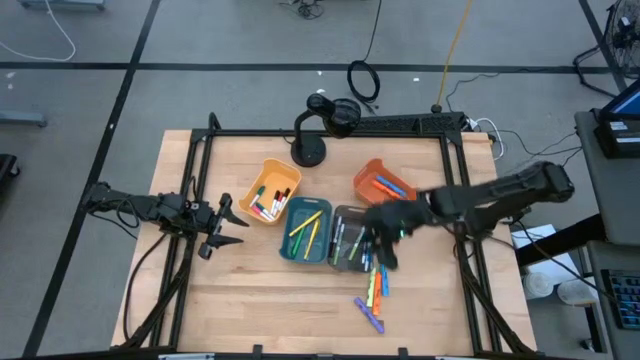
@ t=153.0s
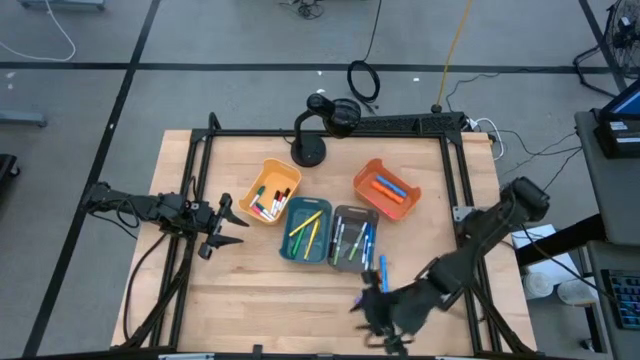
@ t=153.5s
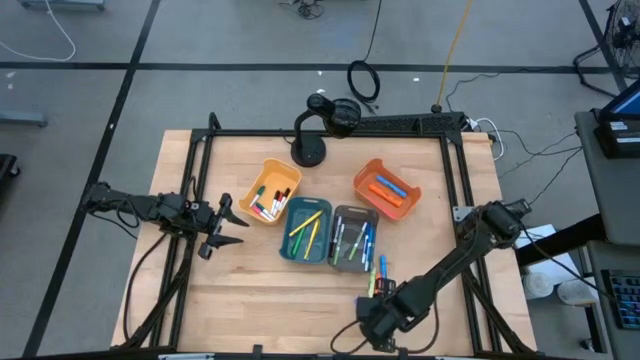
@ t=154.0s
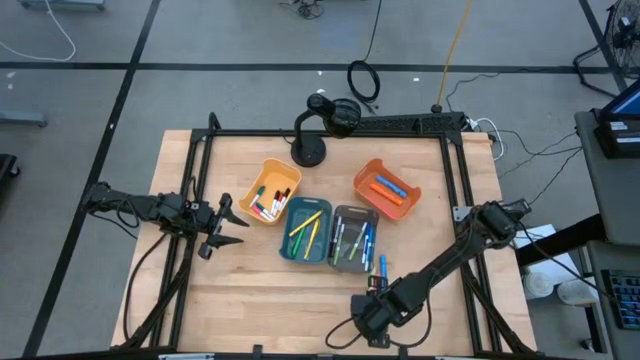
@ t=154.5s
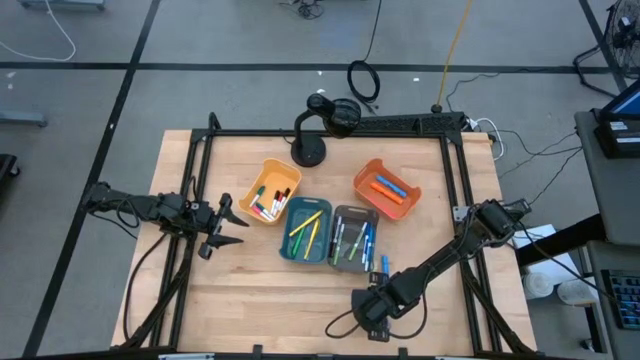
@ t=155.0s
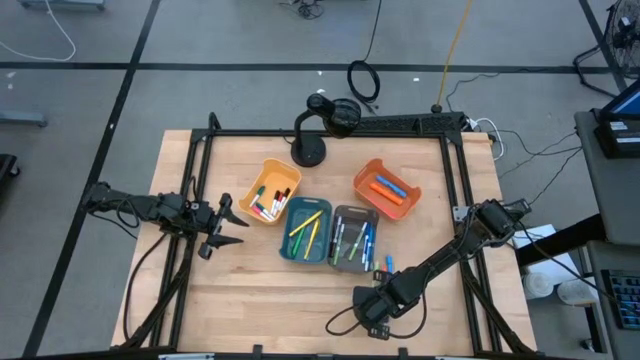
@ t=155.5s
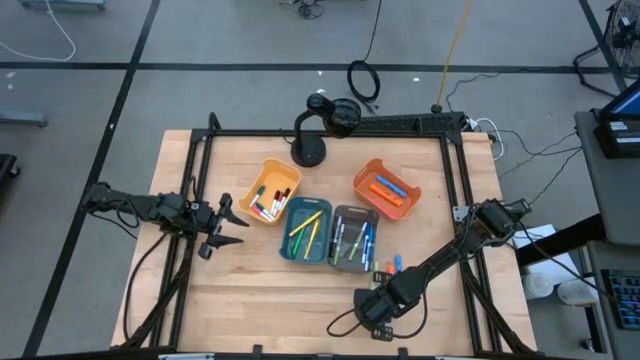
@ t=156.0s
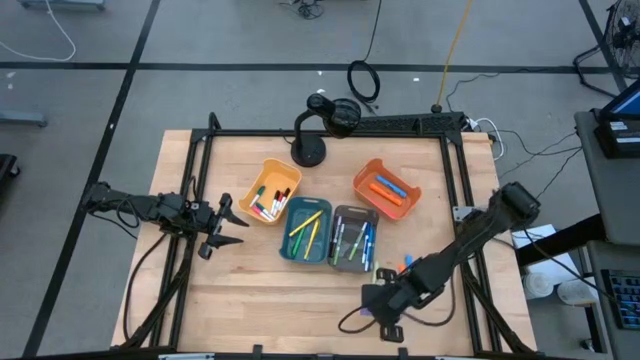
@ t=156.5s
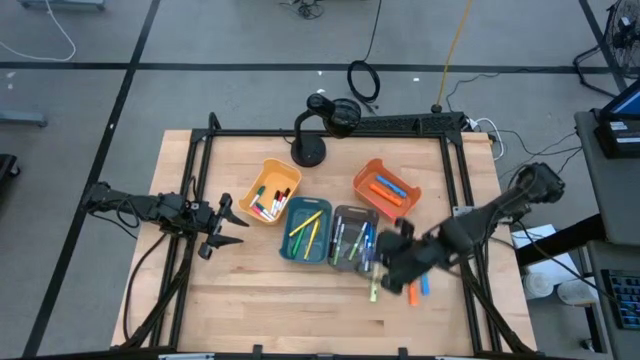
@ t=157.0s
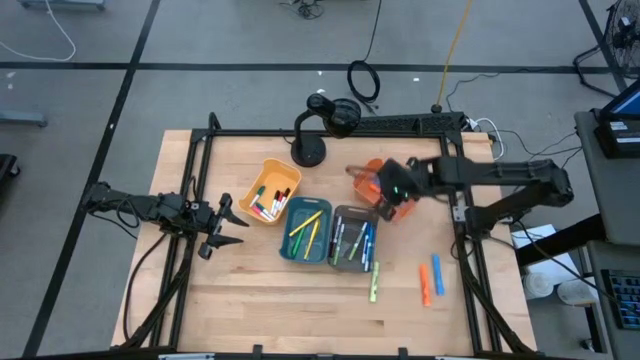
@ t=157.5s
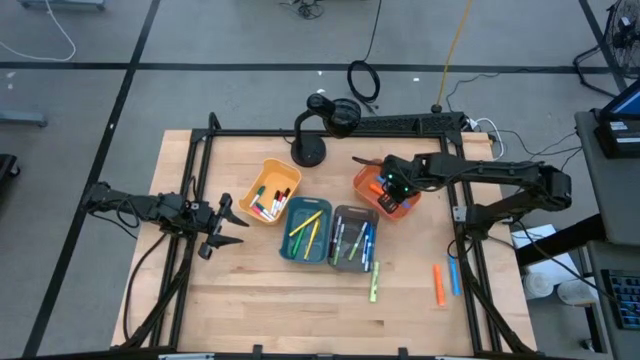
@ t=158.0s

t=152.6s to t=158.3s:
Task: Pick & Place Markers
Put the purple highlighter into the orange bin

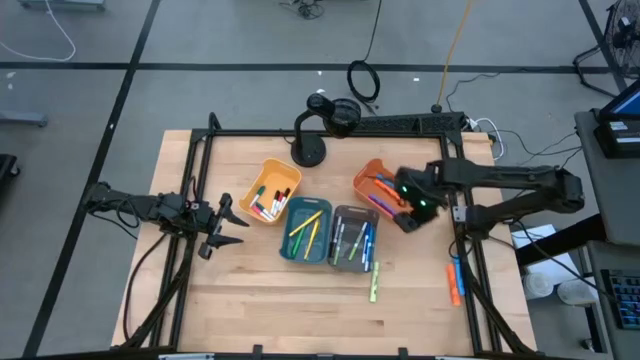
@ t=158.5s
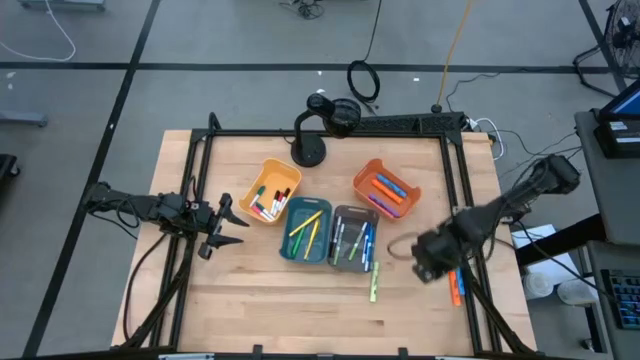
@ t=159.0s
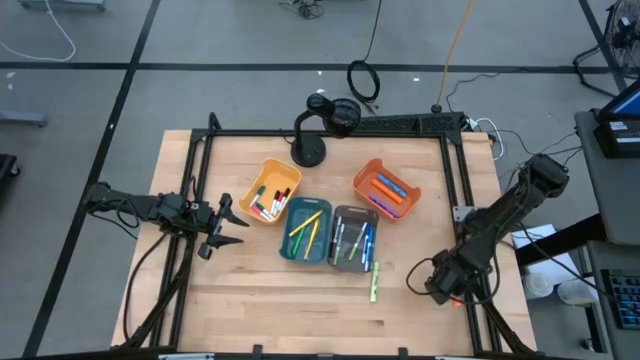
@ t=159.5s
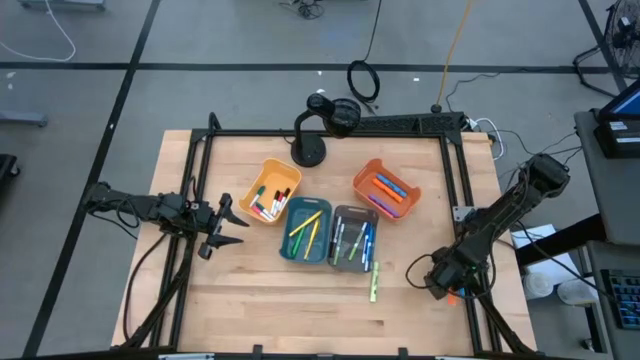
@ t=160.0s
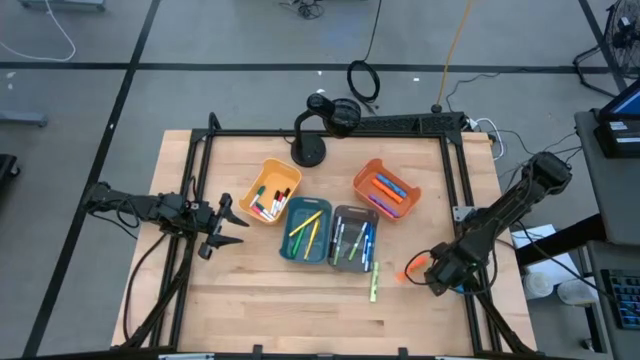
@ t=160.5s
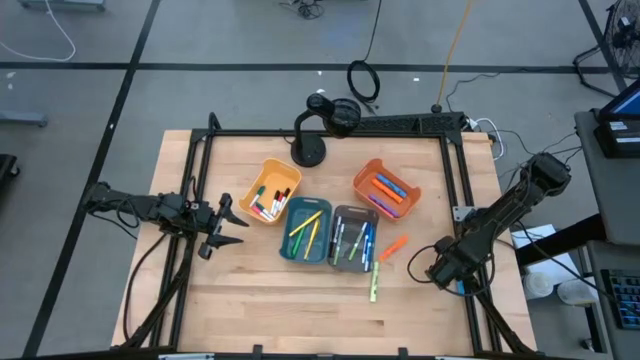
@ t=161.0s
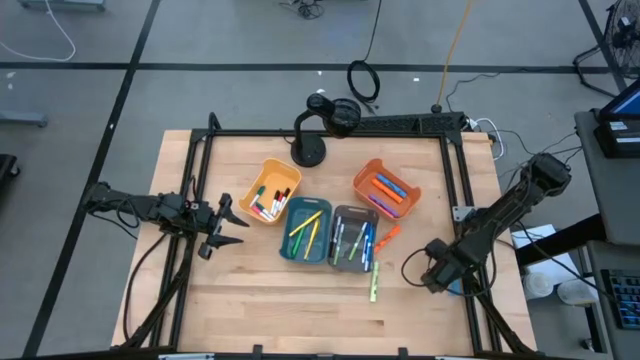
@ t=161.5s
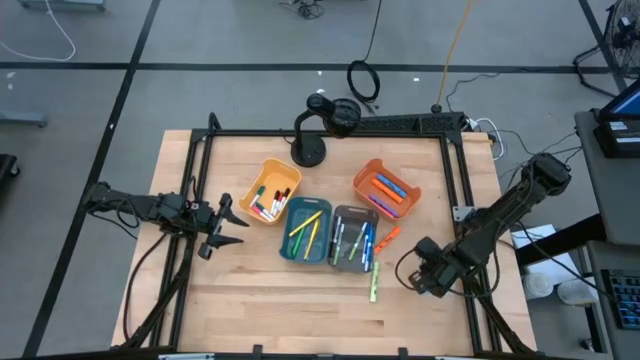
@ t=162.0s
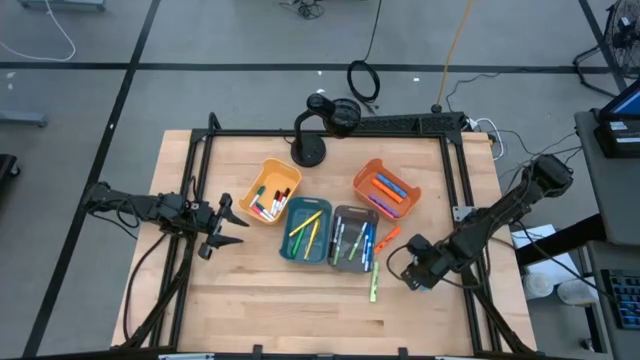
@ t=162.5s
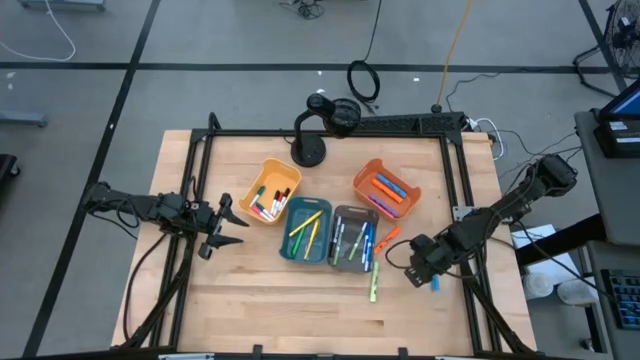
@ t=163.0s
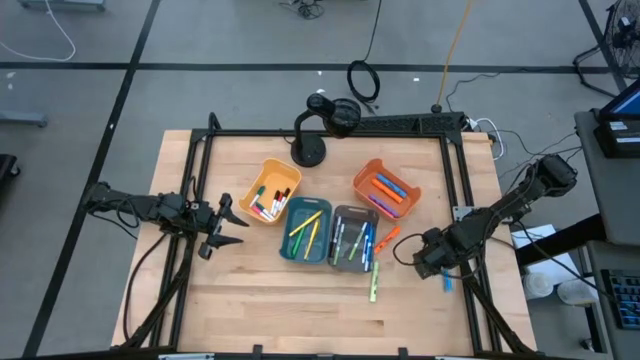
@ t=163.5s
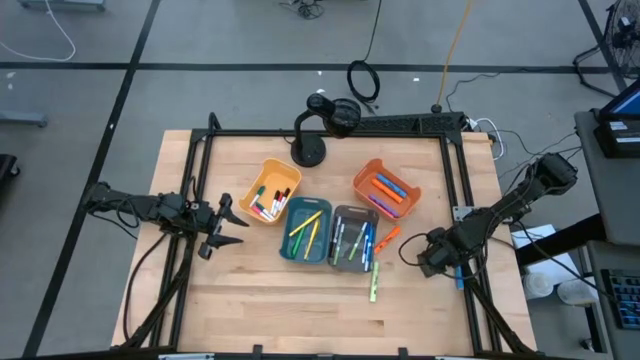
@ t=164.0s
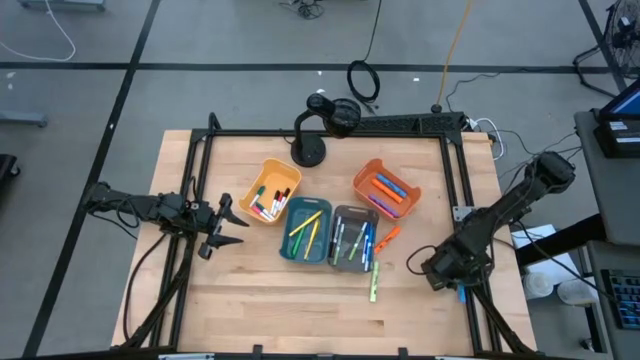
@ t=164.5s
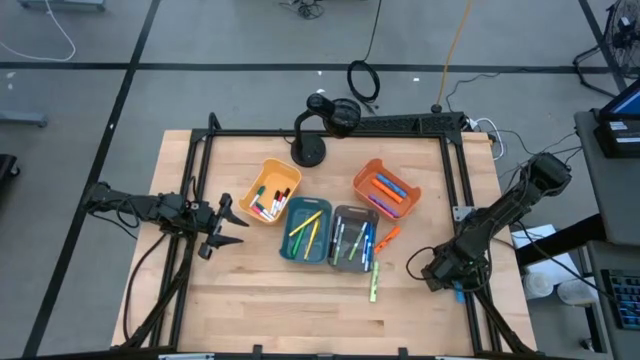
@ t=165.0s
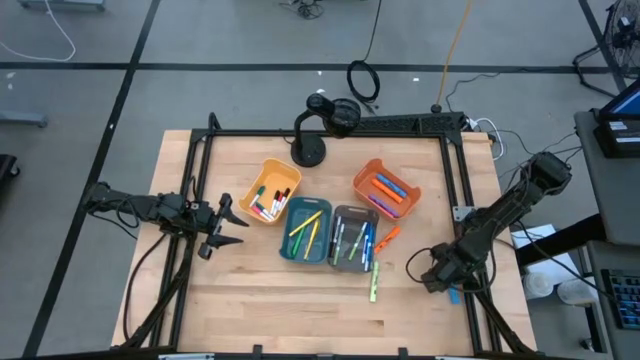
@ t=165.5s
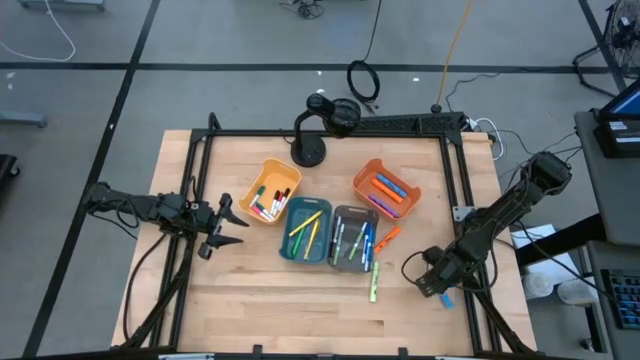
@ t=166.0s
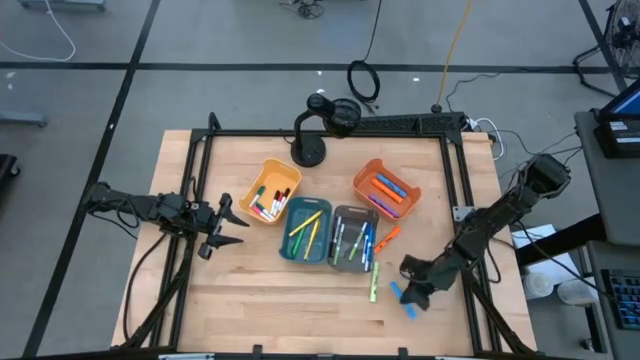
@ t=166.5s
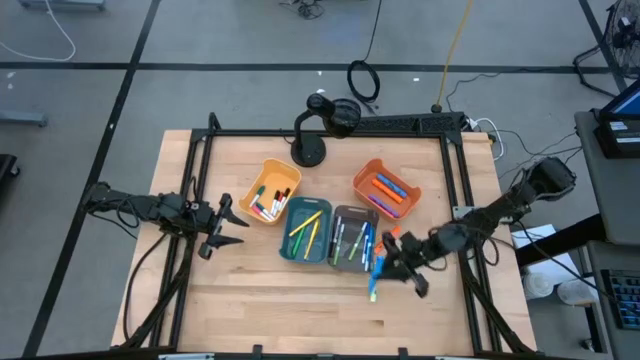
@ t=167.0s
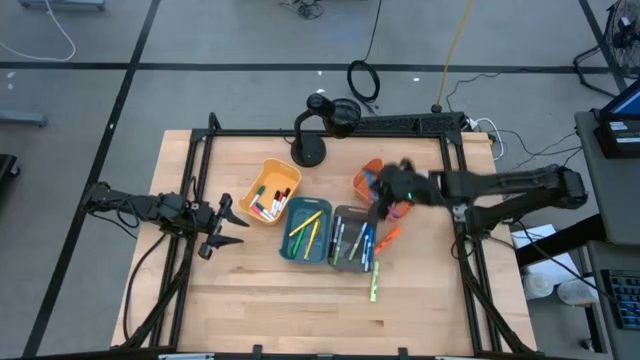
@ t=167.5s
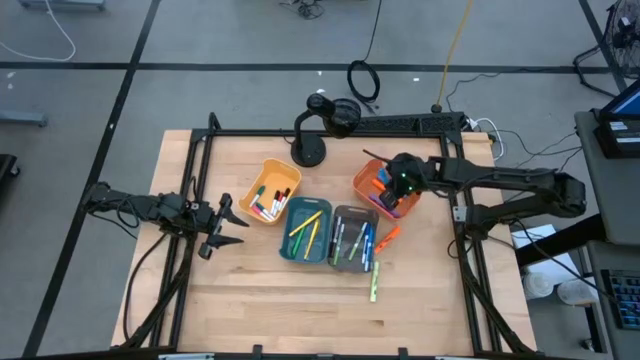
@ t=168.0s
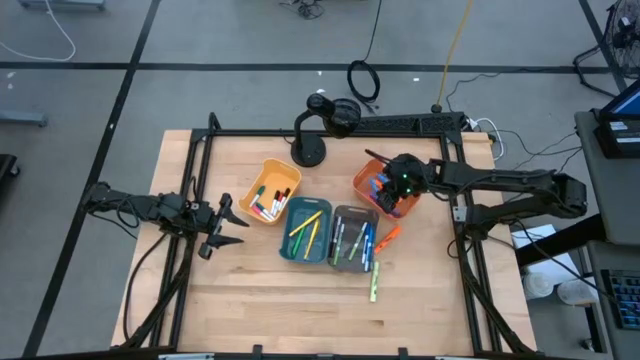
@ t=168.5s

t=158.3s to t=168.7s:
Put the blue highlighter into the orange bin

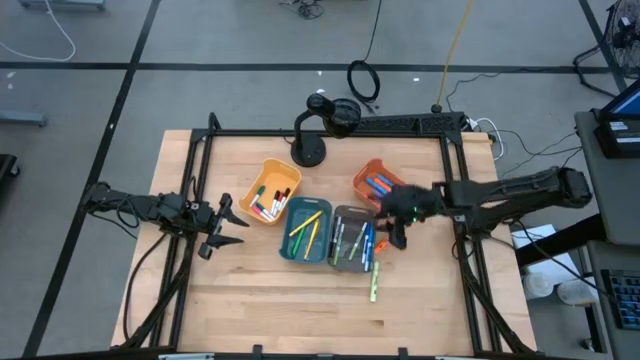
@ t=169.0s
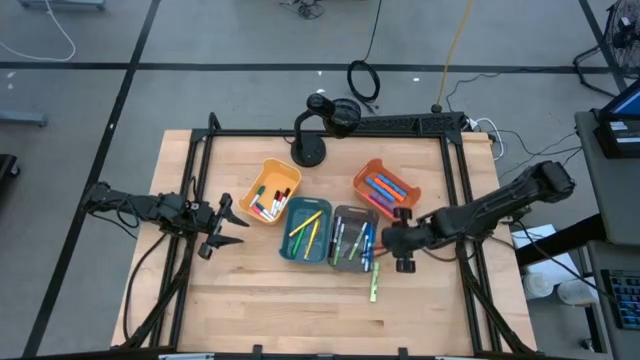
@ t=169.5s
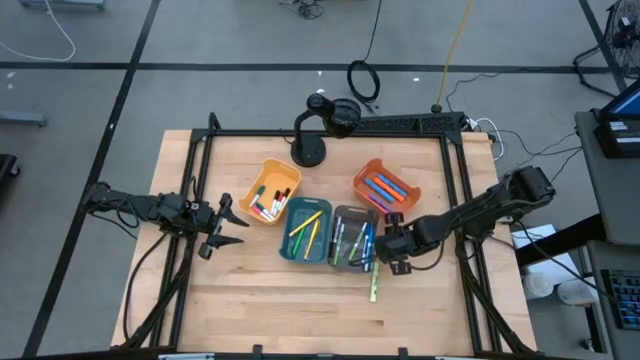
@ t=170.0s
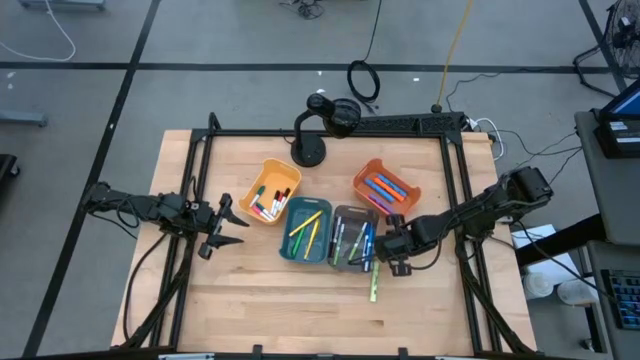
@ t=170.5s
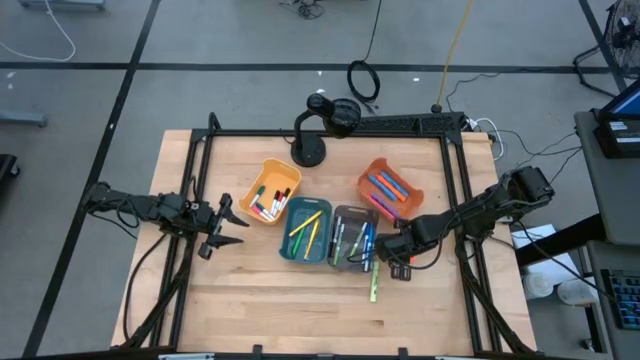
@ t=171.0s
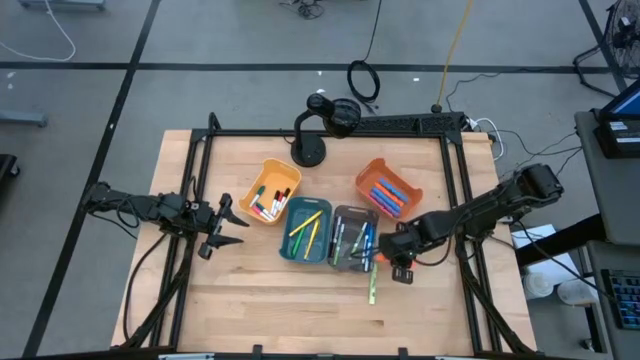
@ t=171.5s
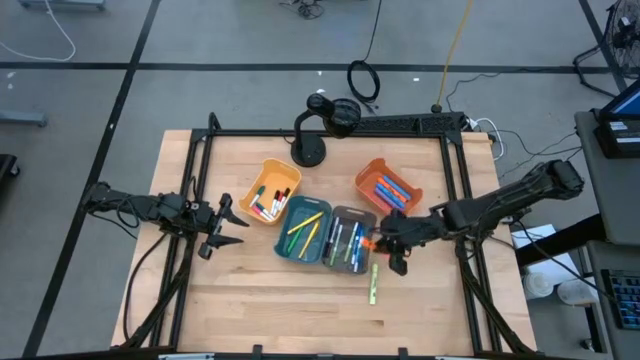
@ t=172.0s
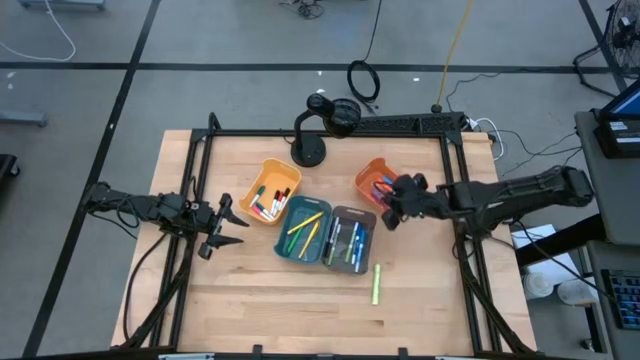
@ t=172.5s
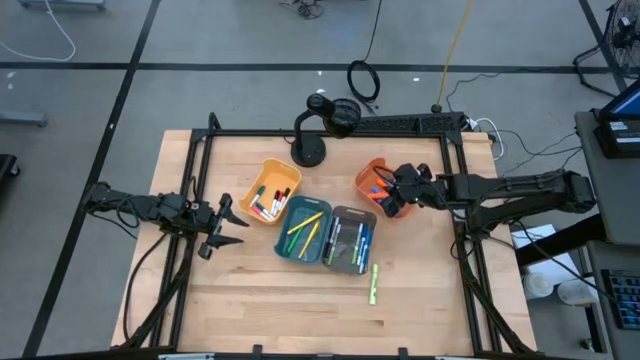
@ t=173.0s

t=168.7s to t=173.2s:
Put the orange highlighter into the orange bin
